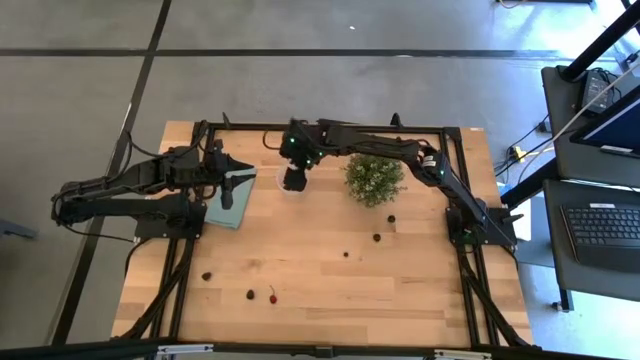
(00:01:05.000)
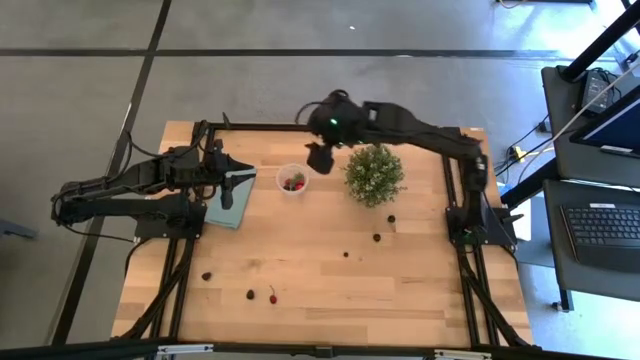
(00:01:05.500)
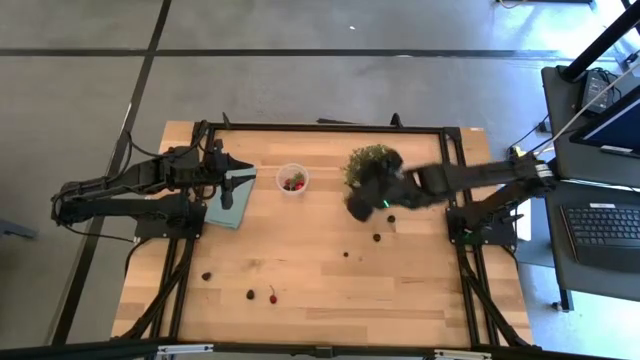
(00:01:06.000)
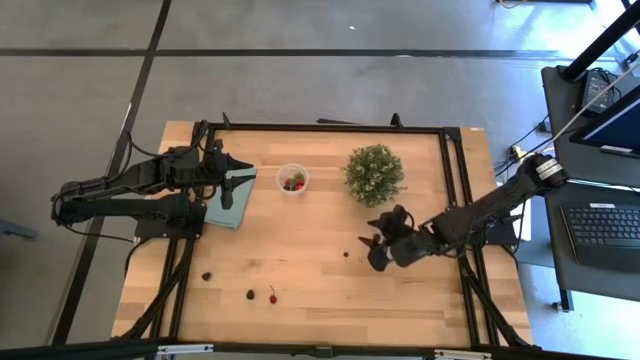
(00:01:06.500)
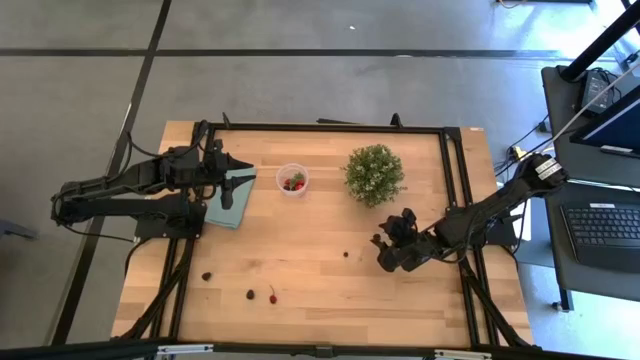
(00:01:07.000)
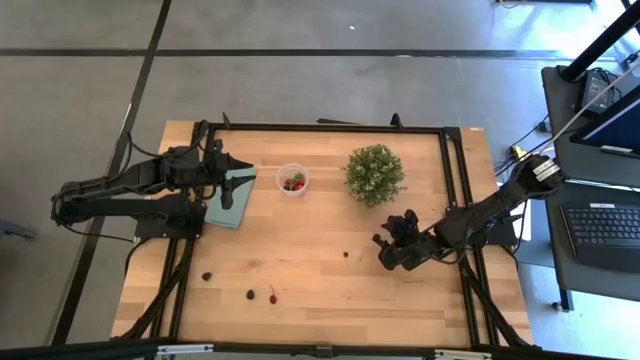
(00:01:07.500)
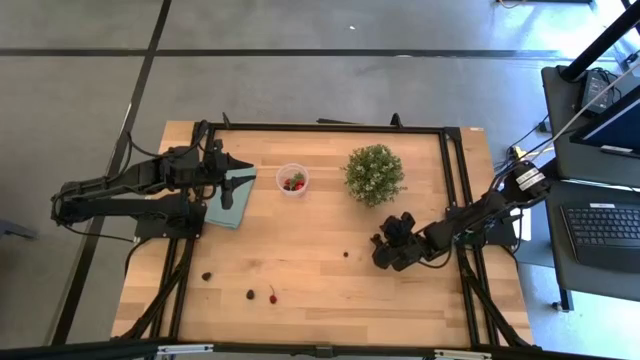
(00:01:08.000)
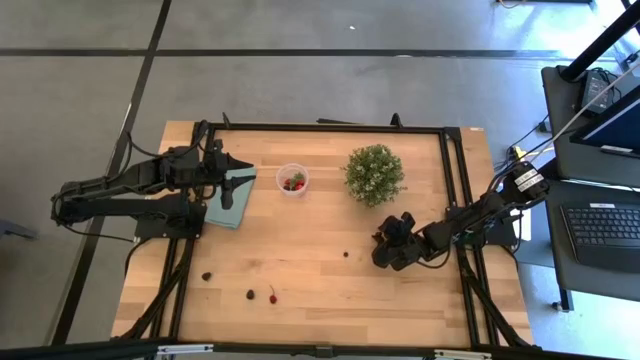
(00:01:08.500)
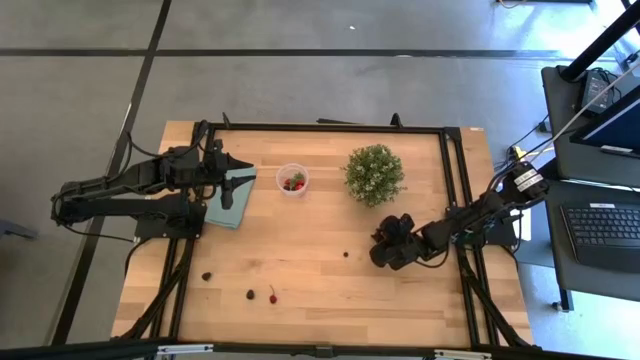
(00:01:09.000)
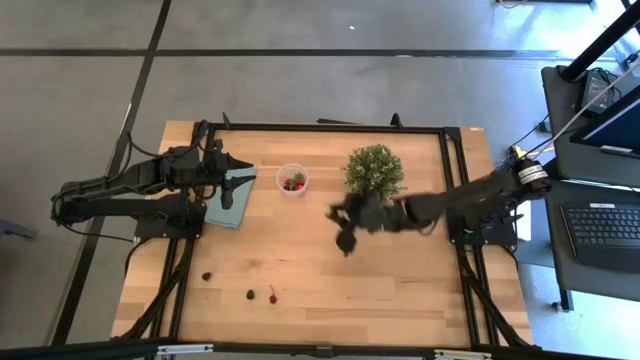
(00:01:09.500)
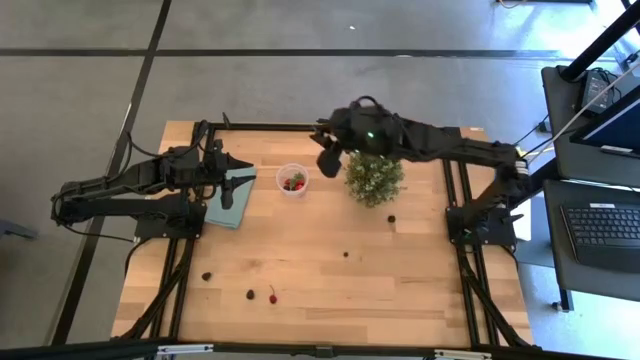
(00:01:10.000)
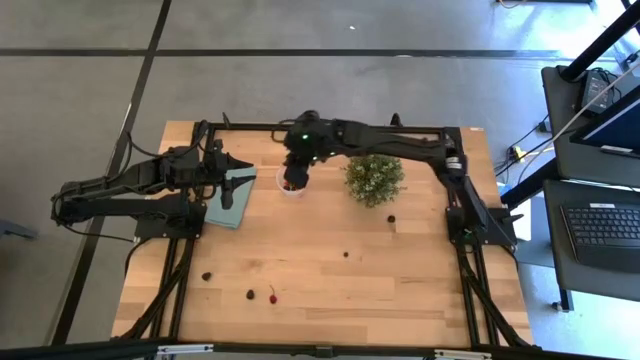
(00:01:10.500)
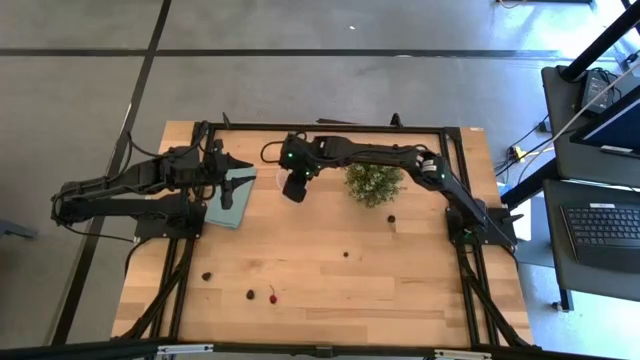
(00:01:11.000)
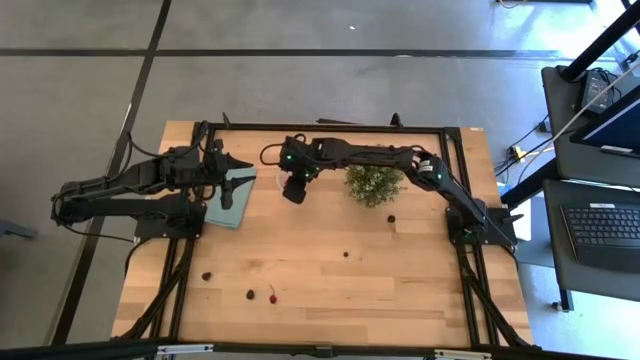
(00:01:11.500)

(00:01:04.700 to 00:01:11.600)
Task: Pick and placing Produce into tupperware
Put the black cherry into the transparent container

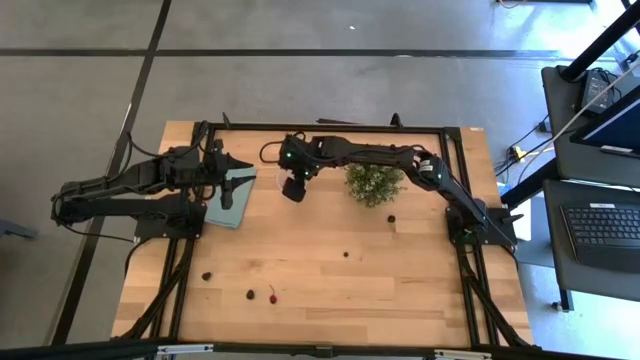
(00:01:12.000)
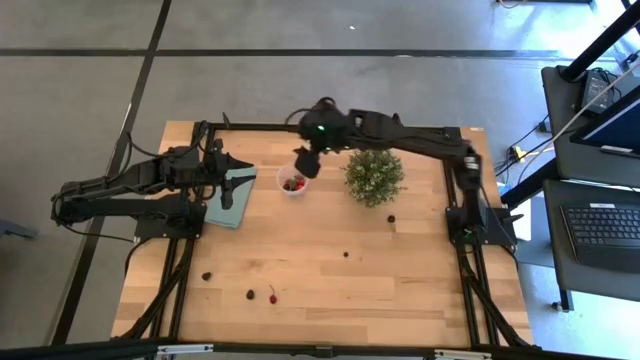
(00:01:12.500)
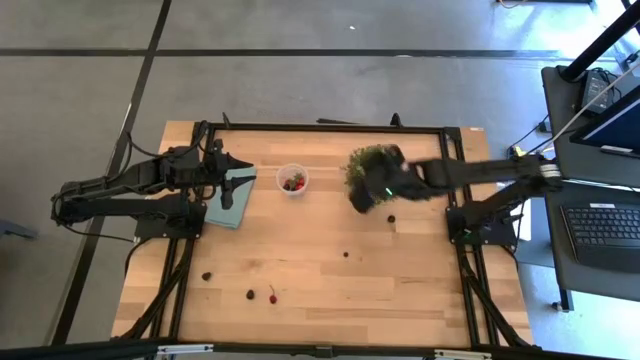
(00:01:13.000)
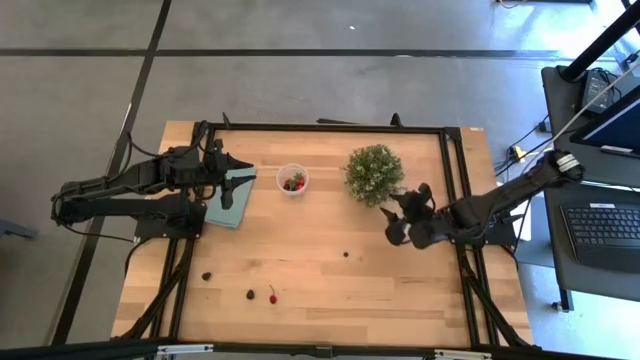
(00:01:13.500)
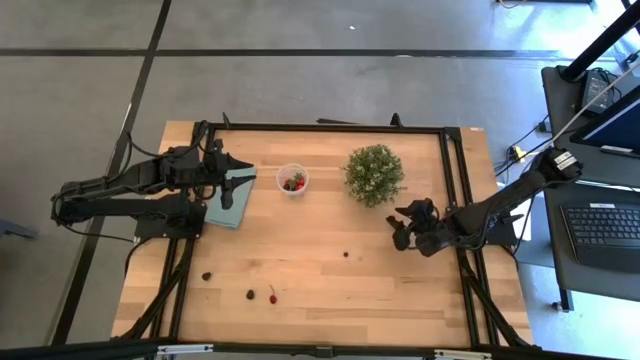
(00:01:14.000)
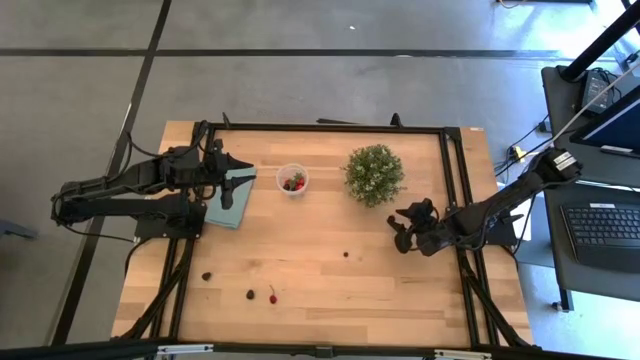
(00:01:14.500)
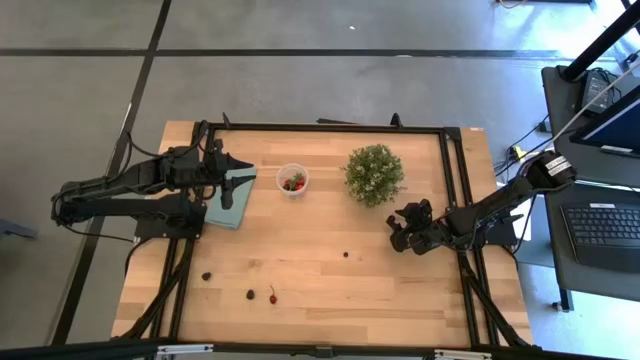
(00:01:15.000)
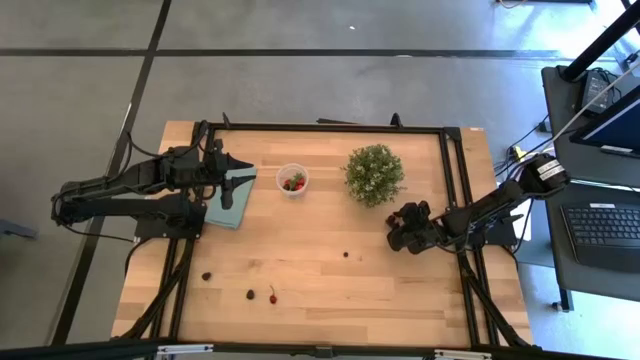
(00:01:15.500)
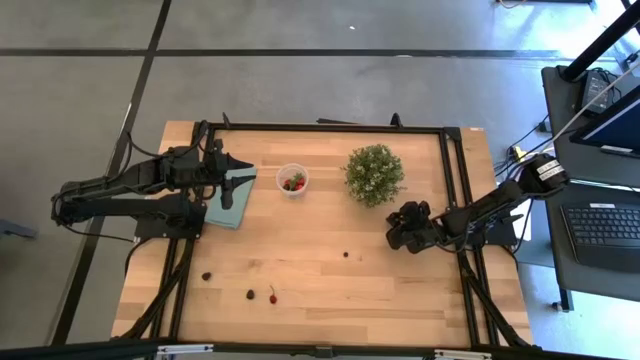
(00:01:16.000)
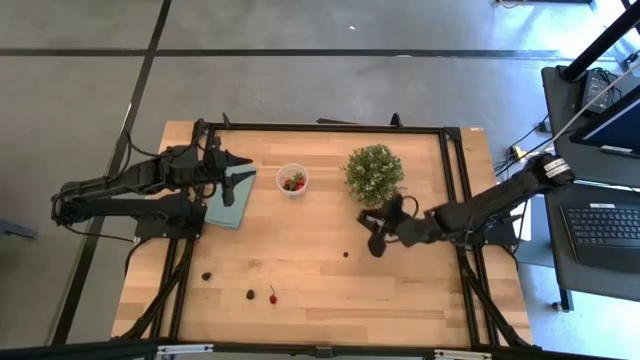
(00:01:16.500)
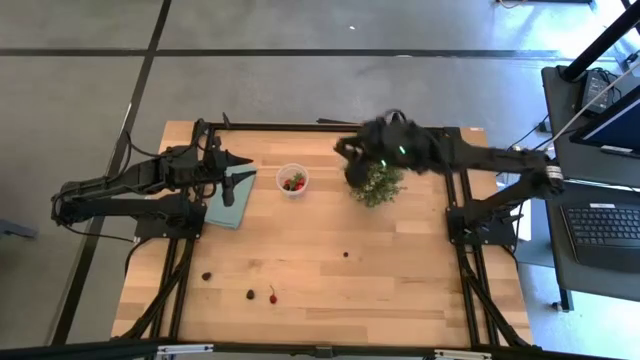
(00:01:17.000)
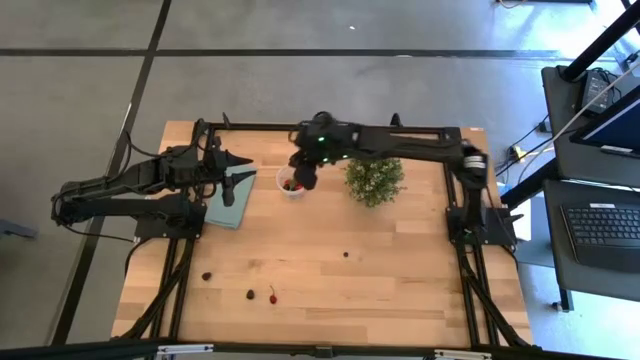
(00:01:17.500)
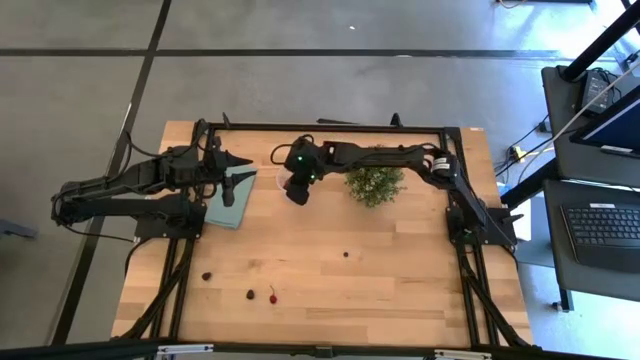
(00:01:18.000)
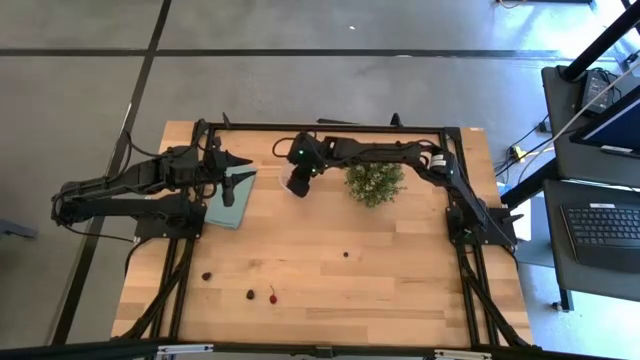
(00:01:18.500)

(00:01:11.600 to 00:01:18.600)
Put the black cherry into the transparent container

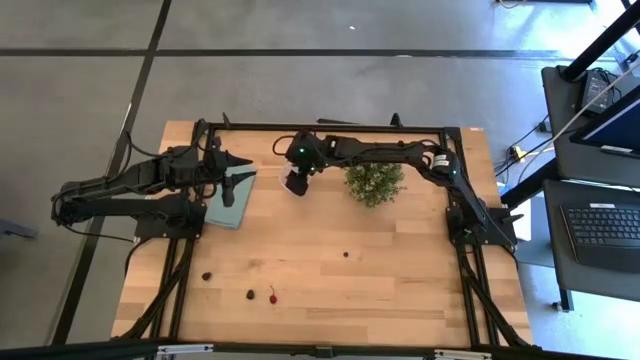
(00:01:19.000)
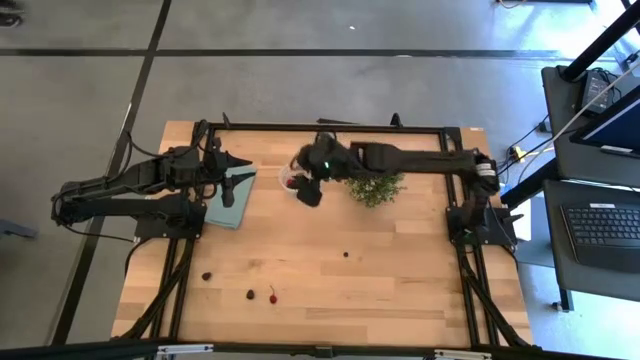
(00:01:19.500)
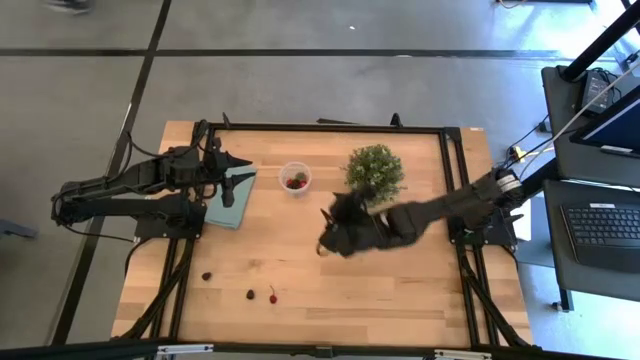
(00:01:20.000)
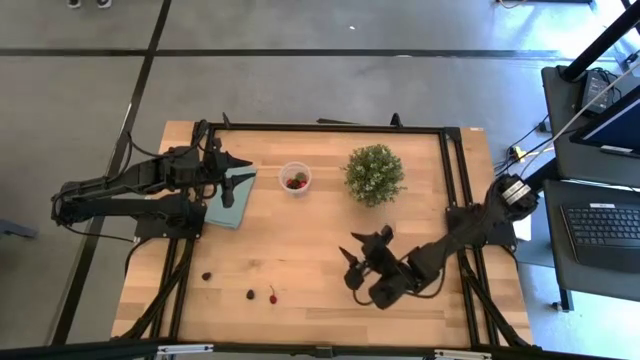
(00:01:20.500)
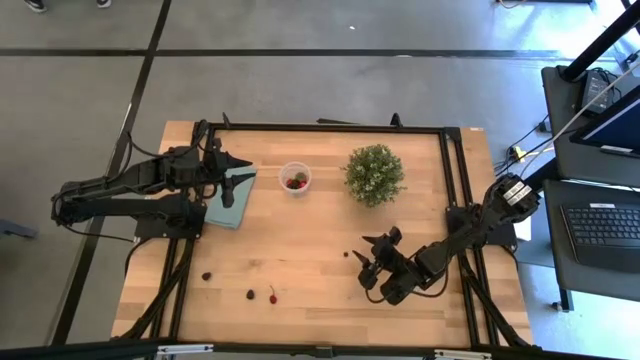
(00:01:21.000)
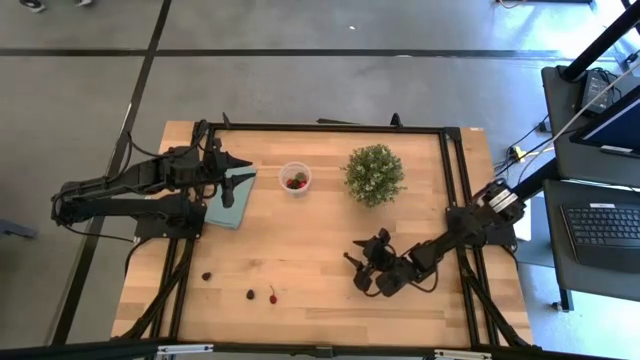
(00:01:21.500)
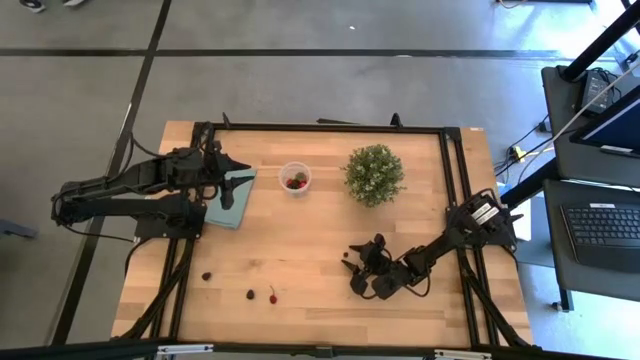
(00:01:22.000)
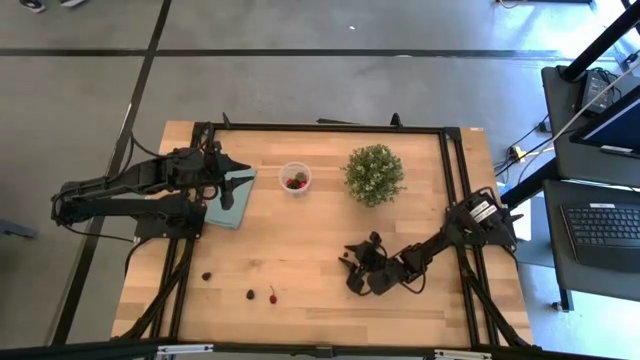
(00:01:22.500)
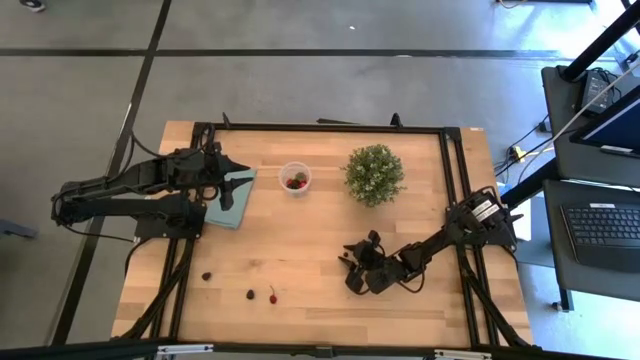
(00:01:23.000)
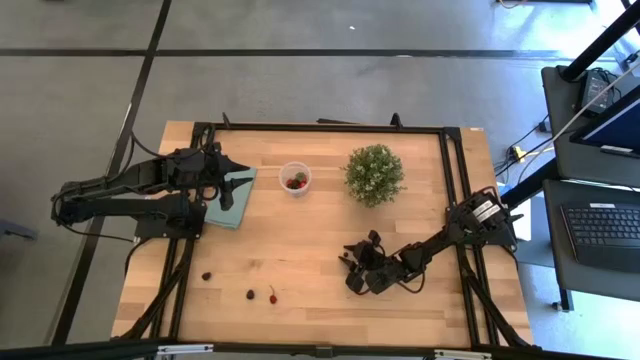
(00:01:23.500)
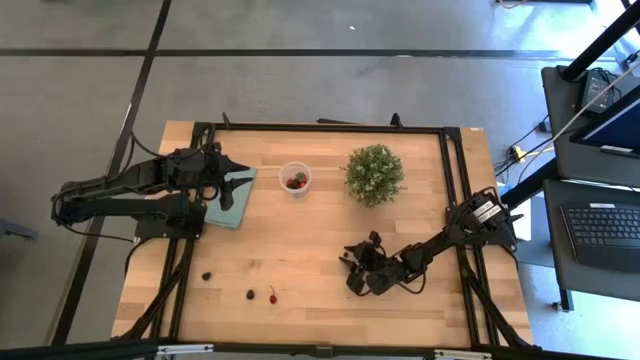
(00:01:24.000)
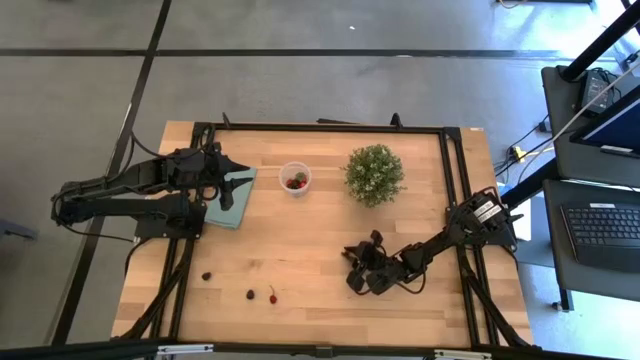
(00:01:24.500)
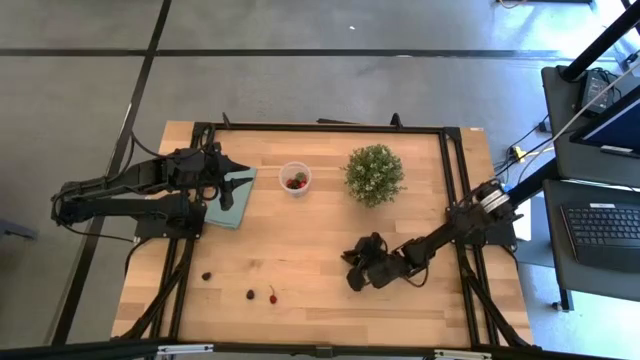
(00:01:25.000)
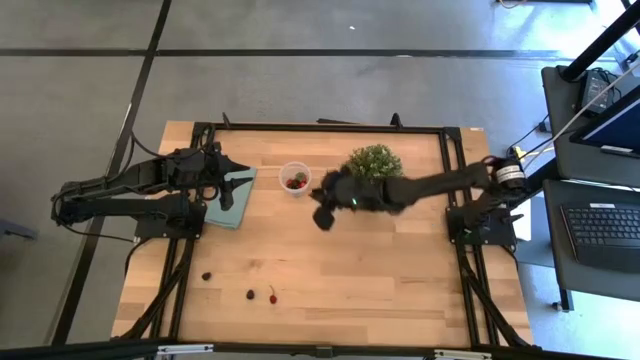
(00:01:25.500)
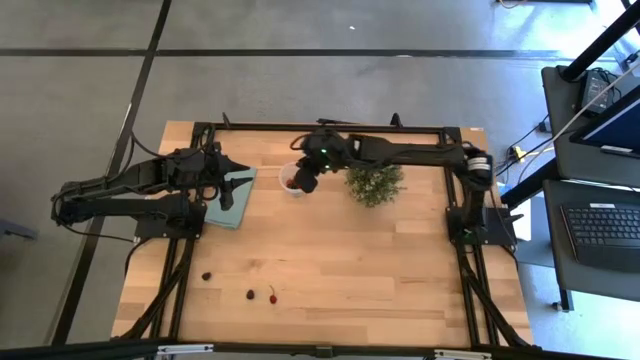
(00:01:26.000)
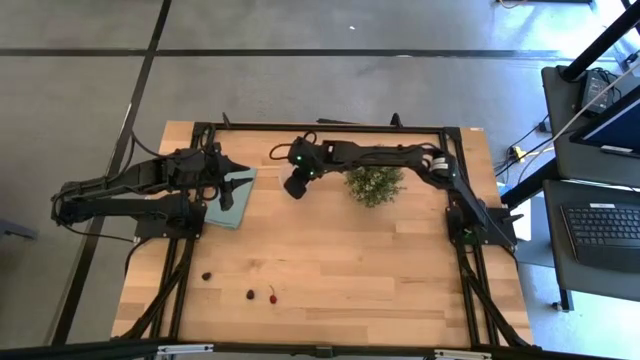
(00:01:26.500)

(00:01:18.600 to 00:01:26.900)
Put the blueberry into the transparent container
